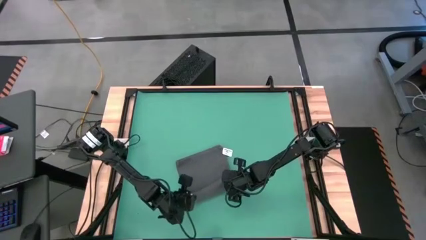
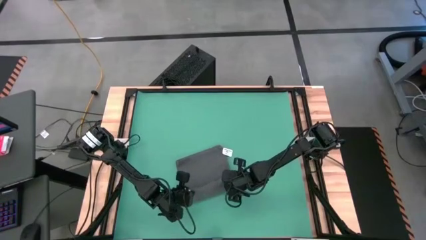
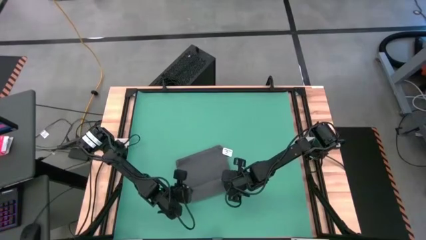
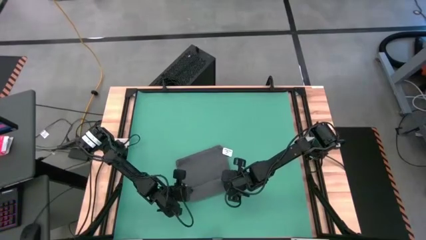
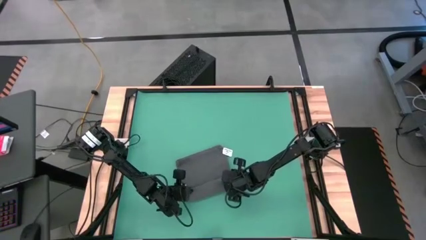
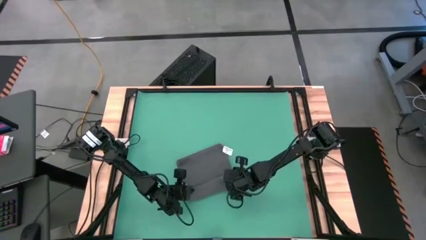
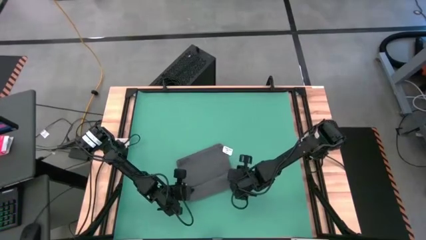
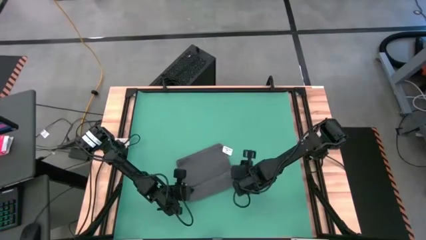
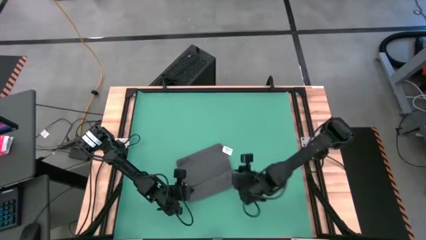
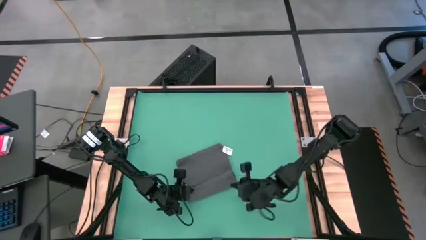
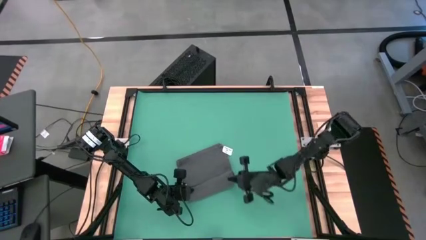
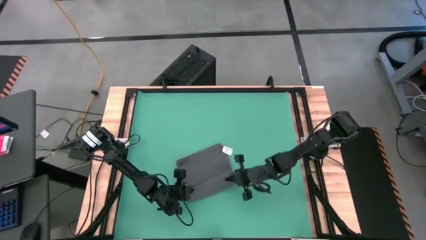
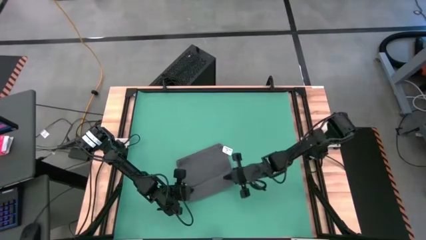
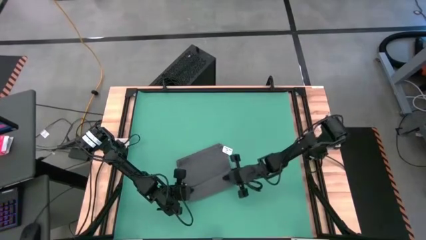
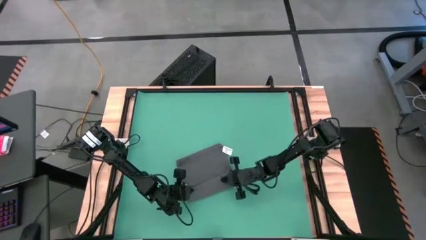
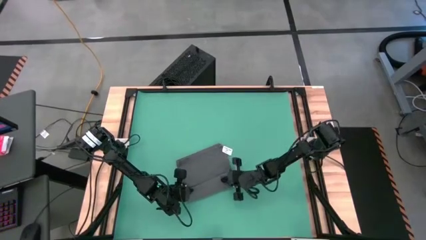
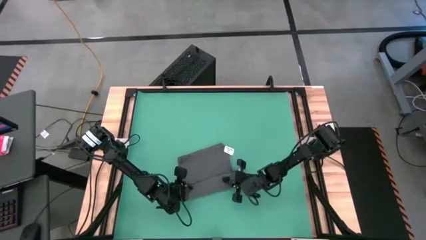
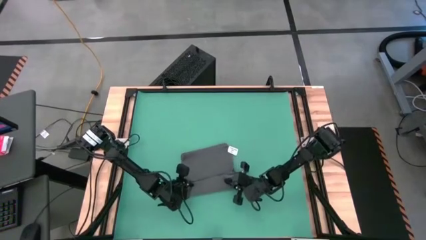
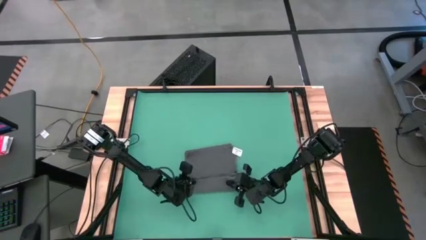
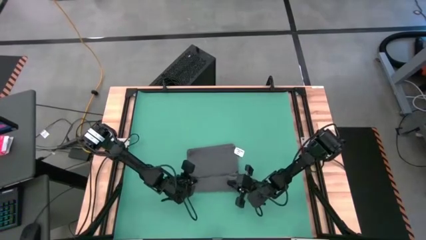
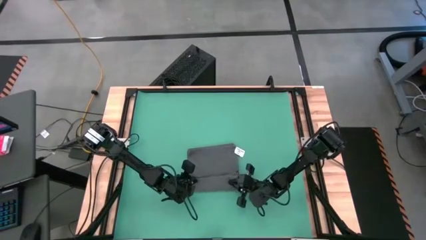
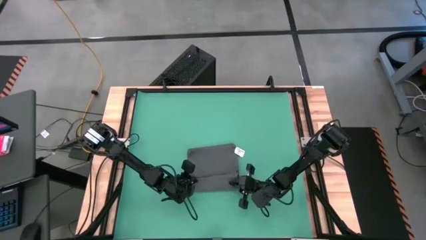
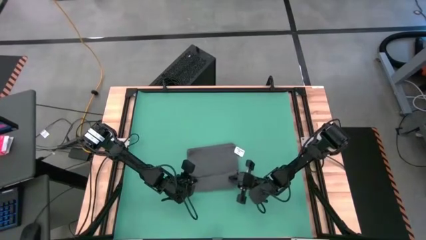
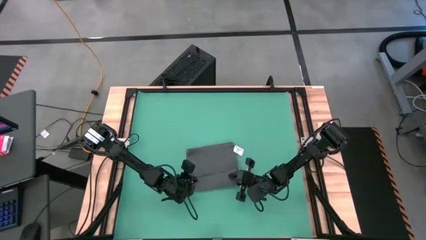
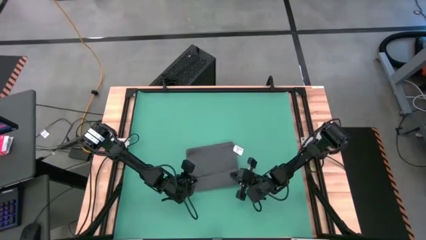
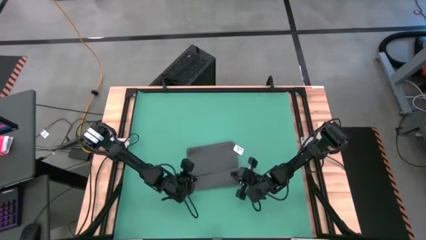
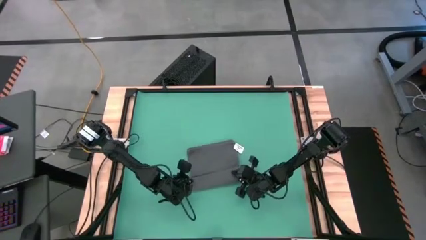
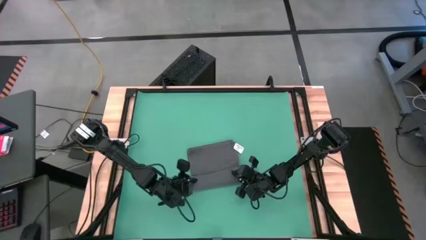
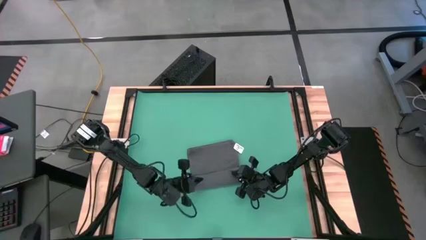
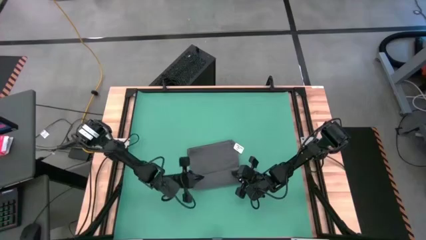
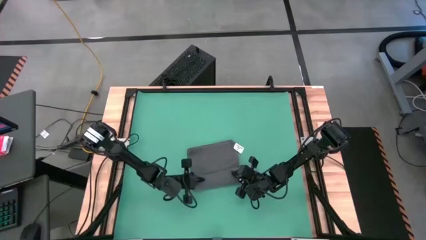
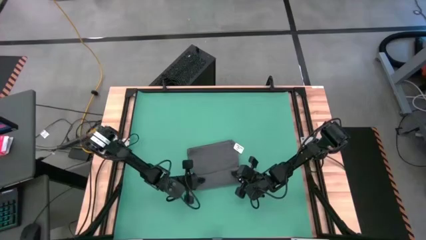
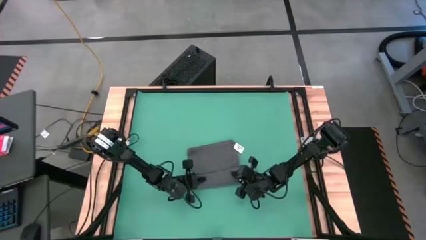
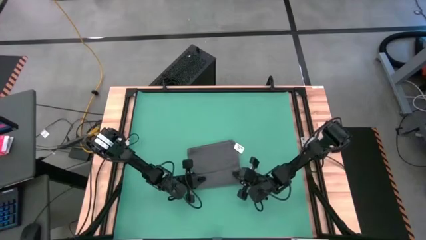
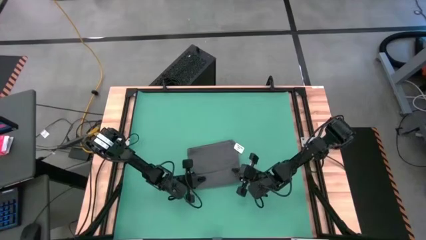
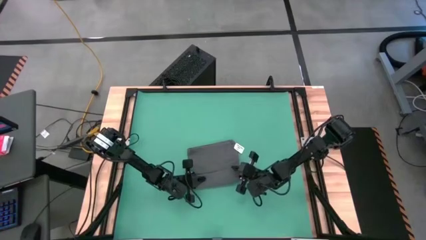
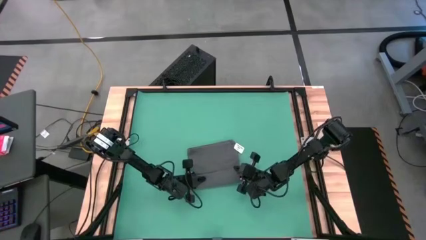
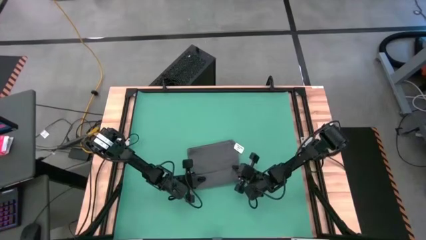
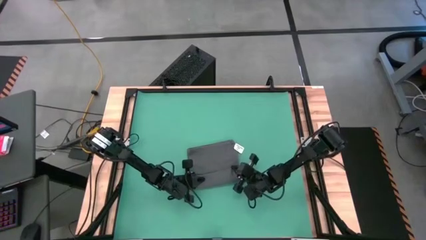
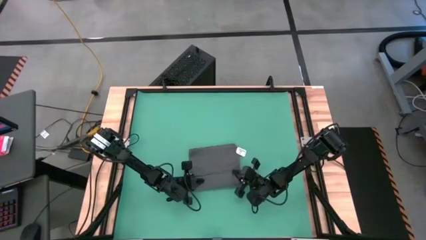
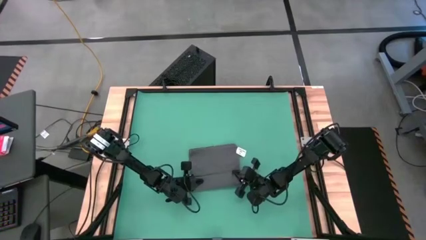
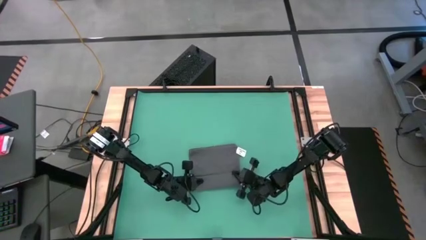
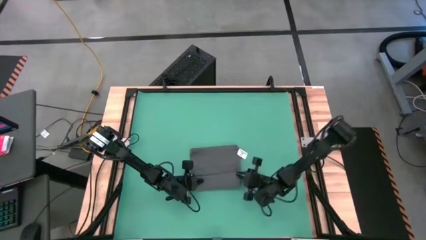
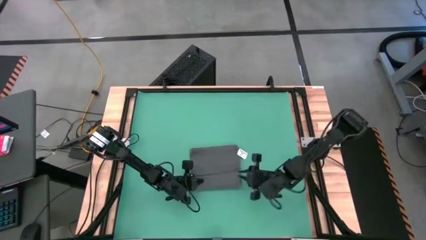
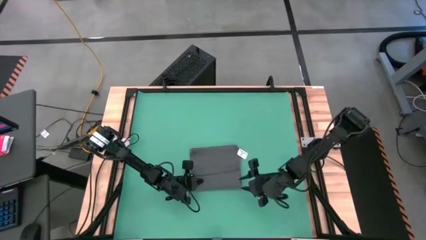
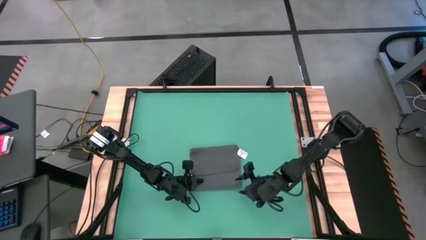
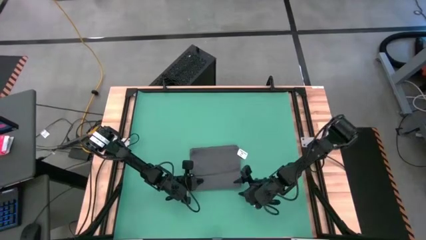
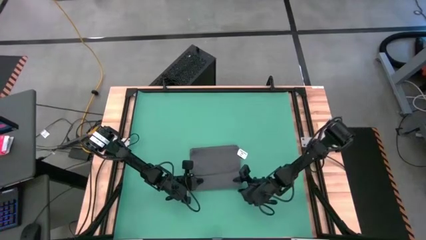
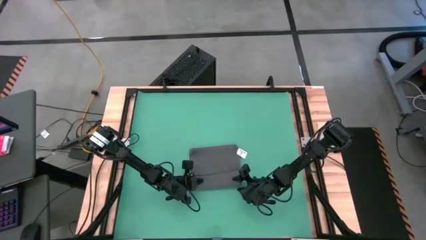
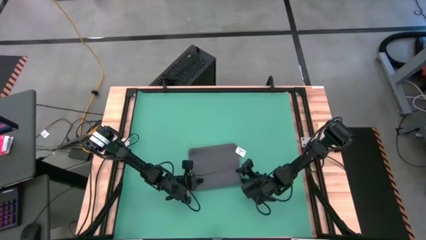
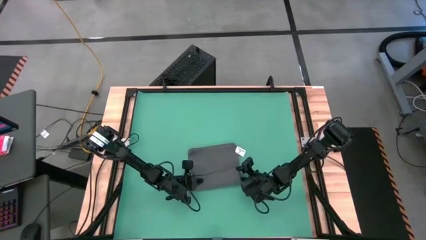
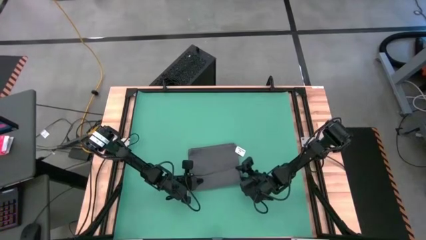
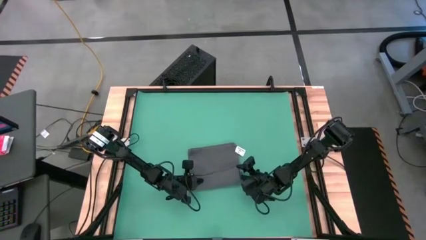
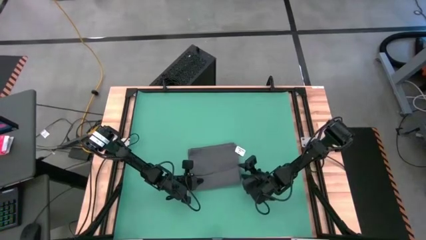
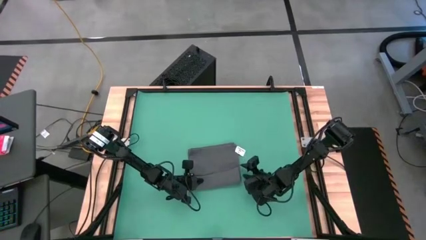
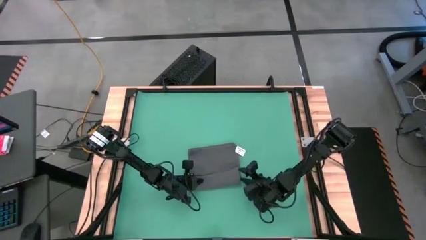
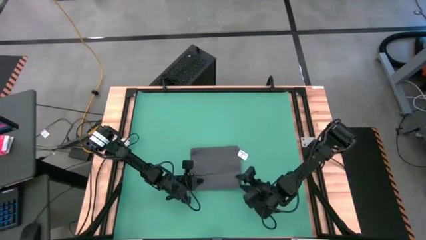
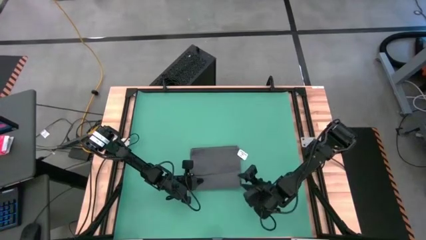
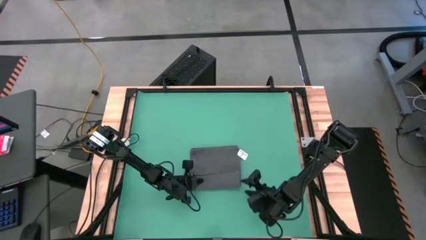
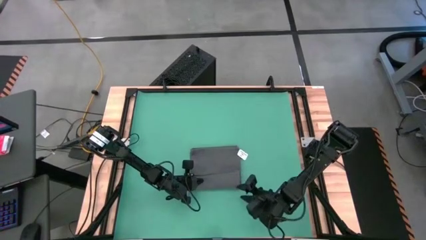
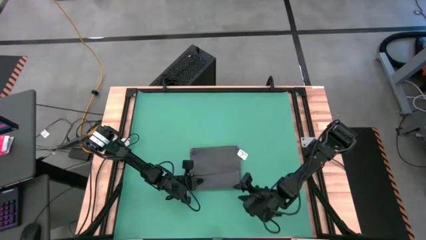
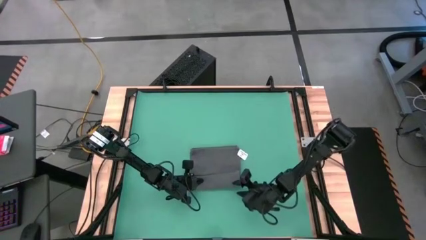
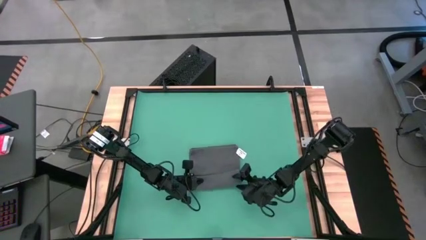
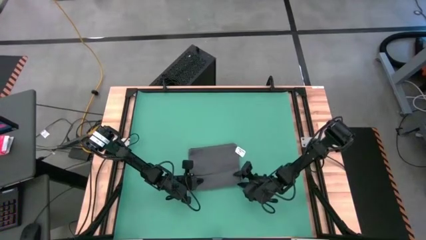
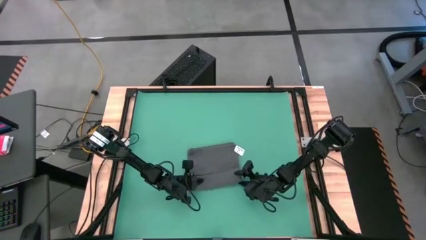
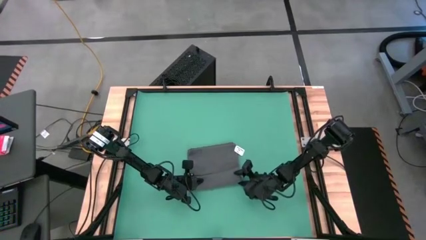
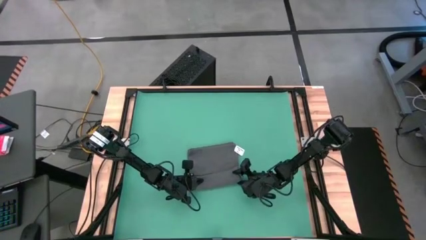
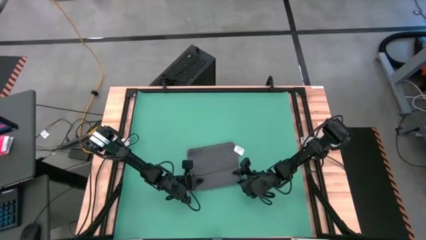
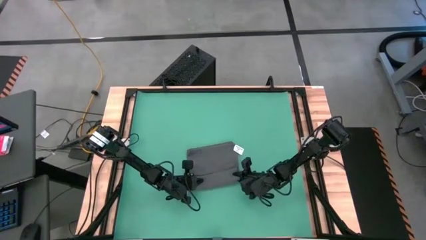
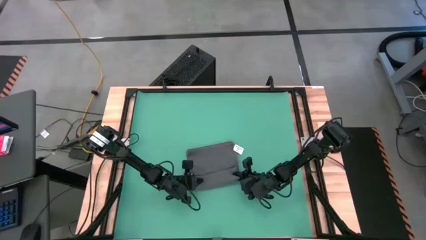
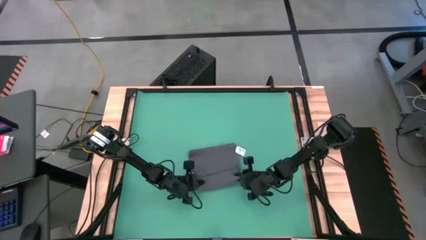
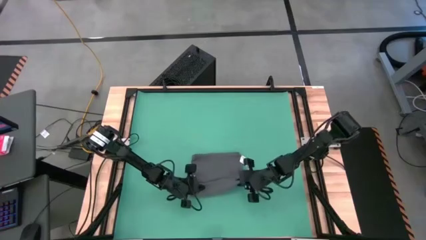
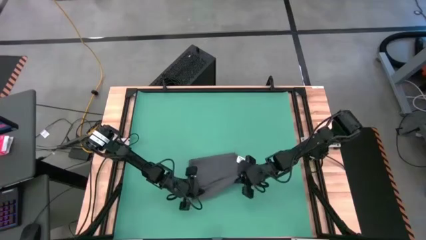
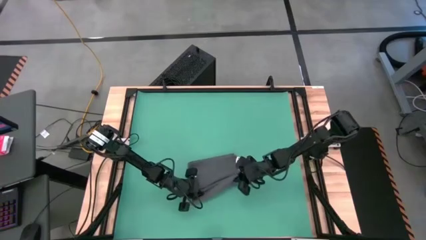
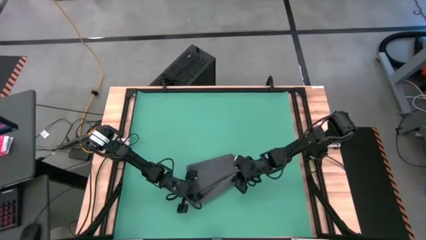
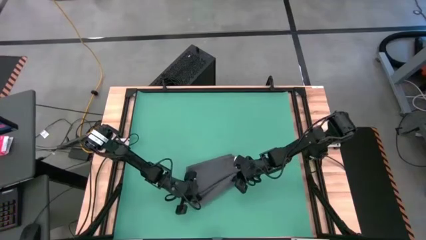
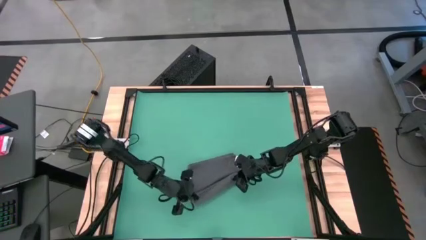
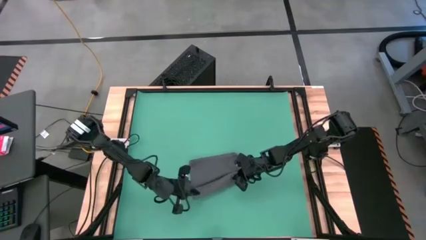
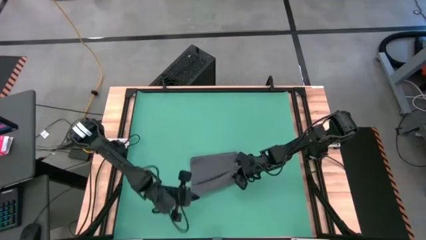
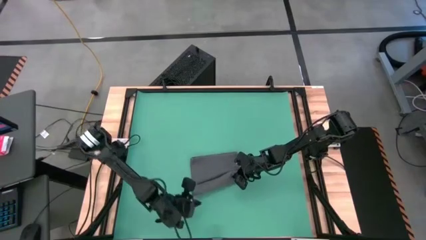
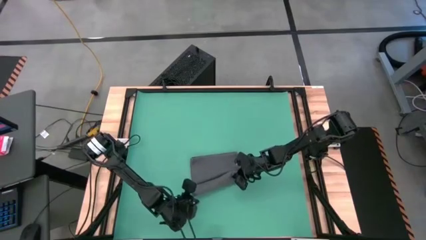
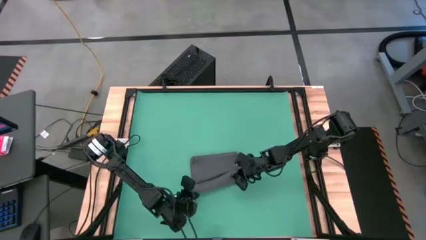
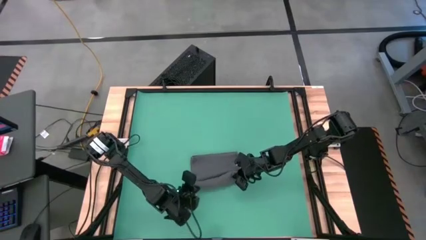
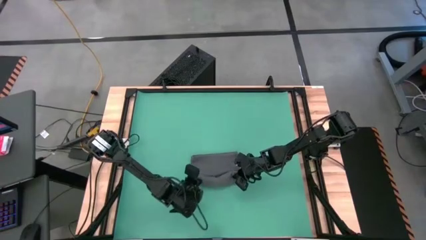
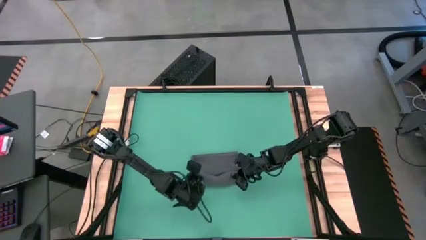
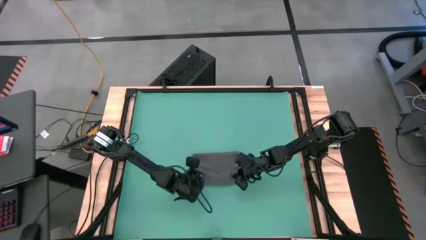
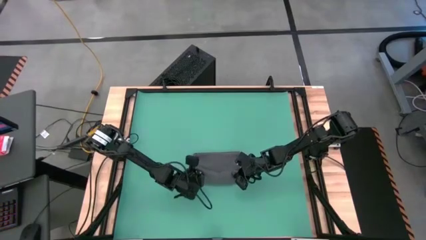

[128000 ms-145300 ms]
Task: Roll towel
Roll the gray towel
